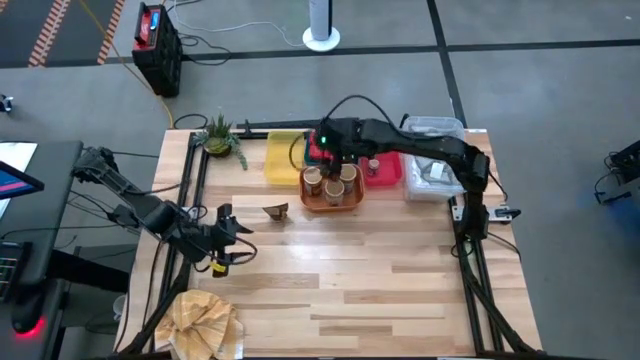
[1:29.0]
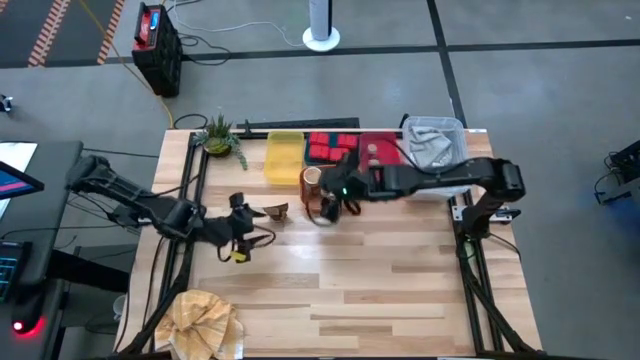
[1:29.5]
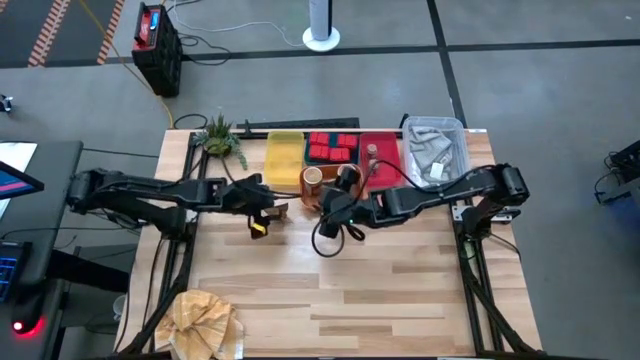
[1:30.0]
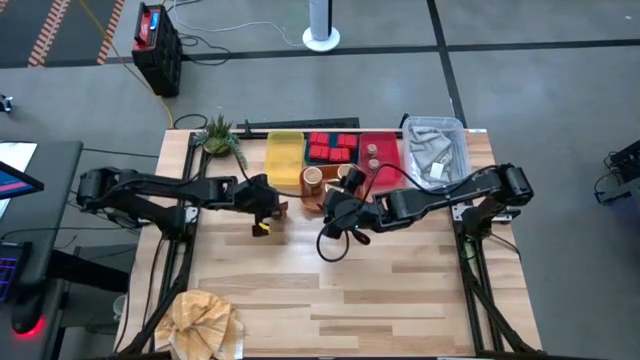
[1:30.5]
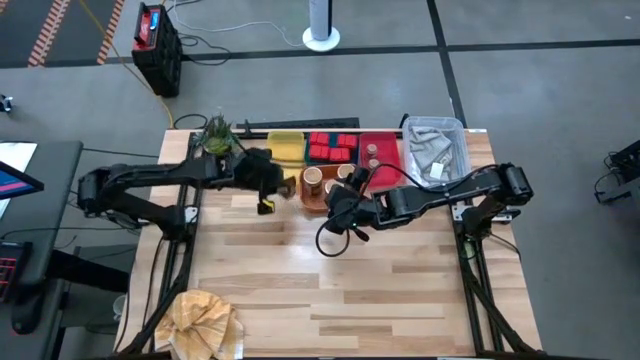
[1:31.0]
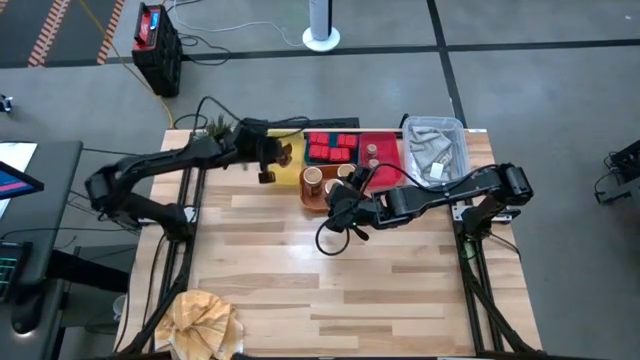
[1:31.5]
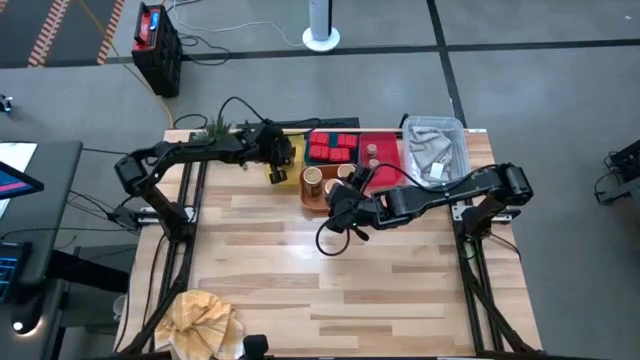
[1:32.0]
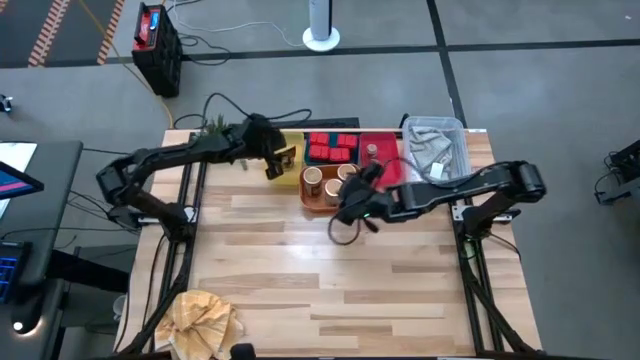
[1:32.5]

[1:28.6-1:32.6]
Task: Sort spices by type
Put the orange seasoning pack into the yellow bin

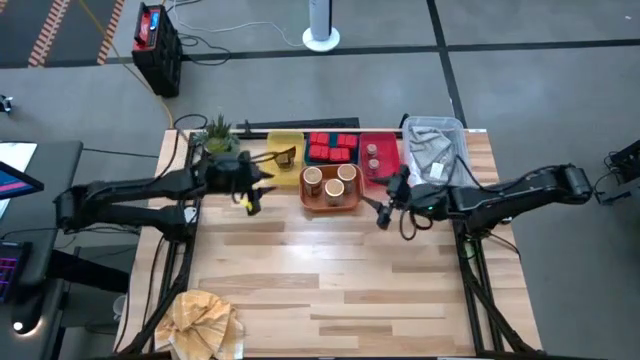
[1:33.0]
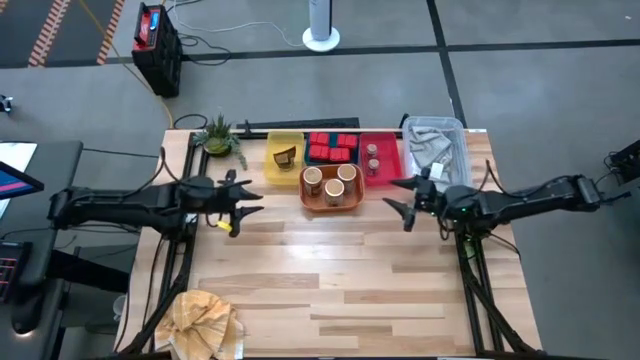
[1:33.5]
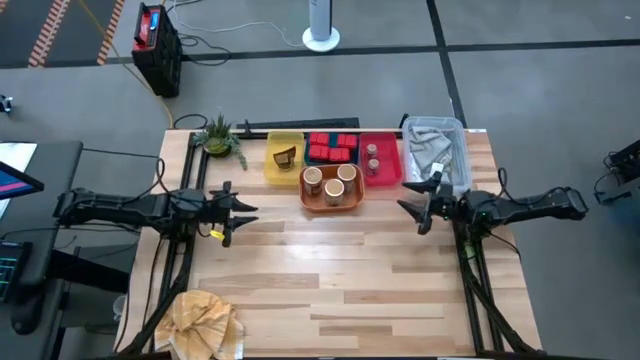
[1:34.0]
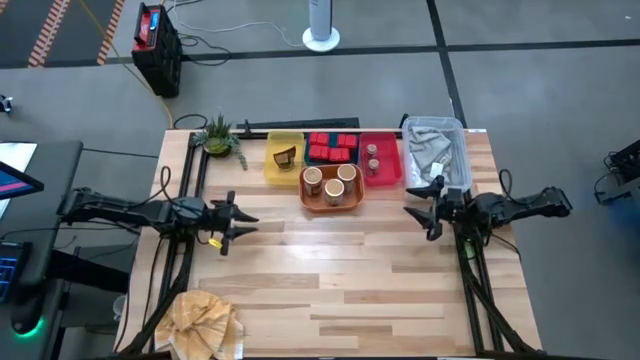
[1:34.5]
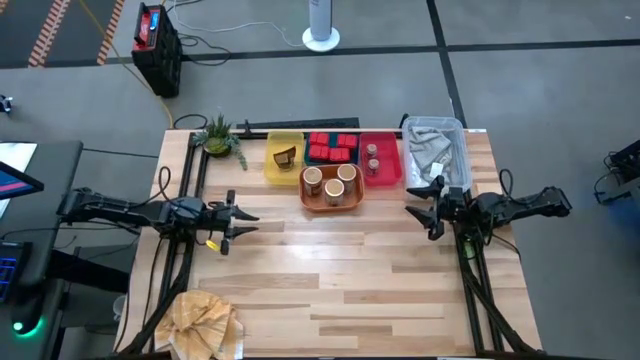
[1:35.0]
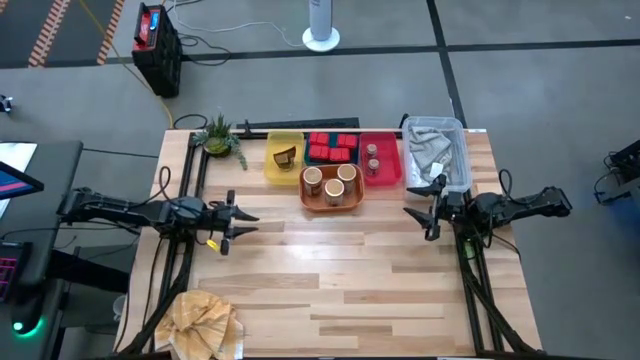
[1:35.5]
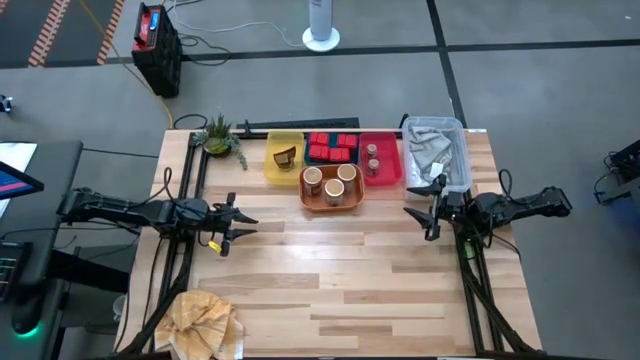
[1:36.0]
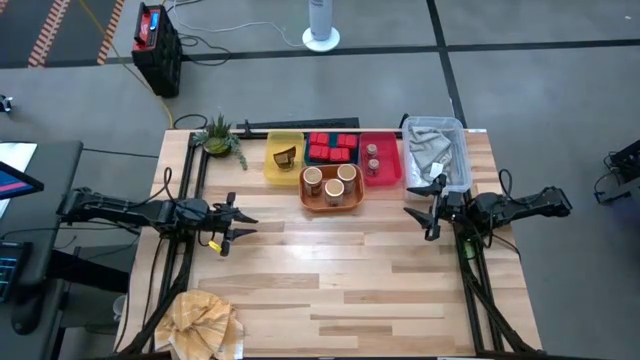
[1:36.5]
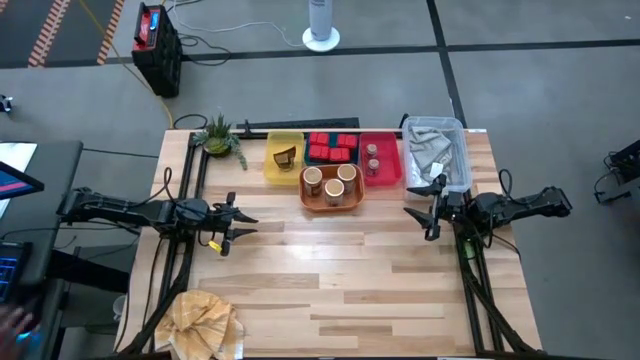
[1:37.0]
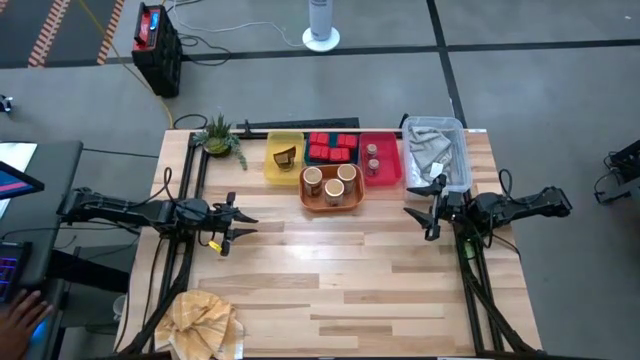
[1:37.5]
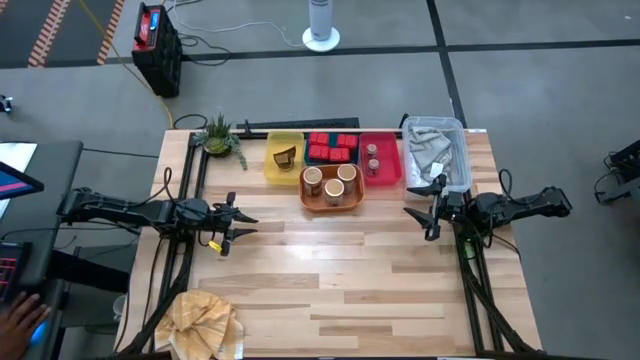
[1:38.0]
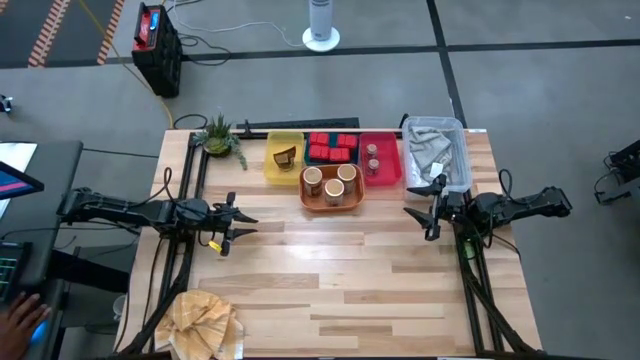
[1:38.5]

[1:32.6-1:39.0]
Return to Home Position

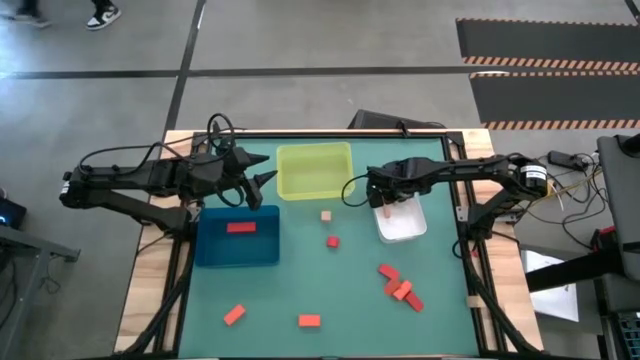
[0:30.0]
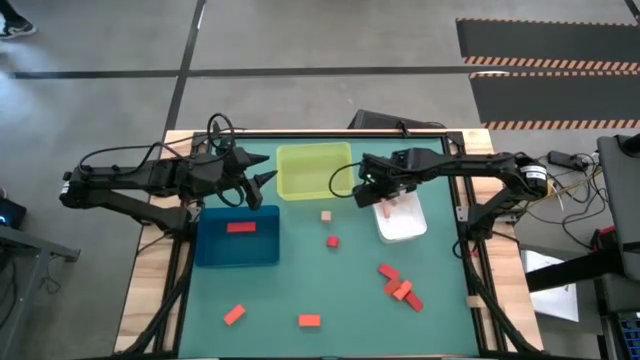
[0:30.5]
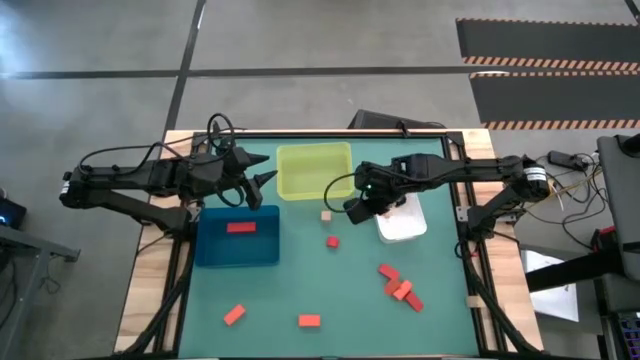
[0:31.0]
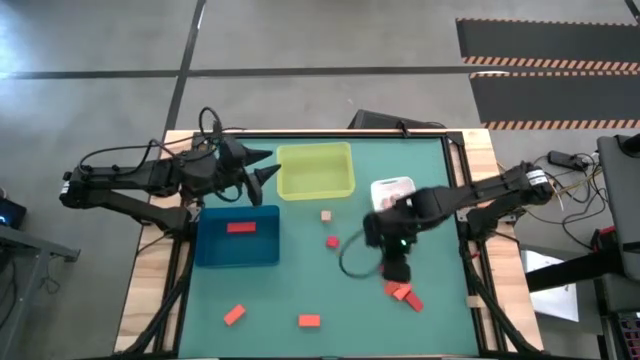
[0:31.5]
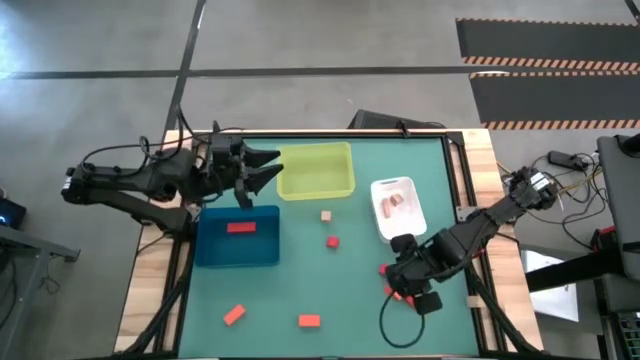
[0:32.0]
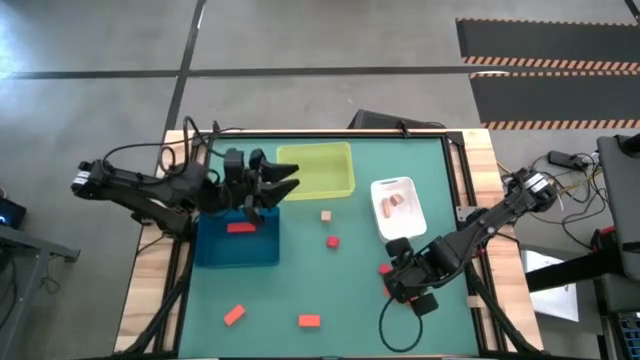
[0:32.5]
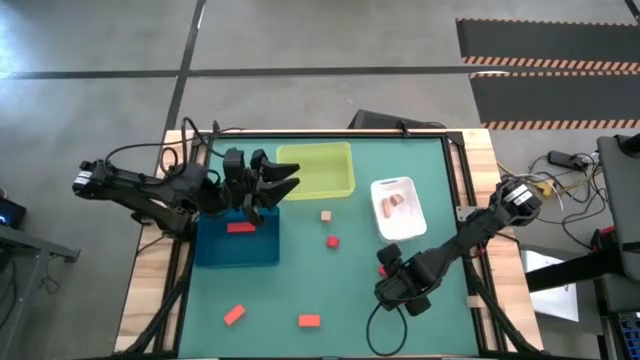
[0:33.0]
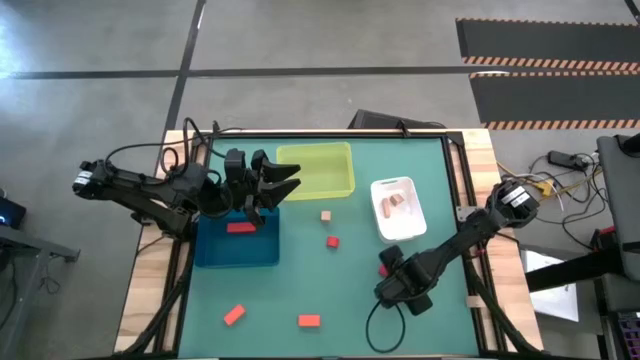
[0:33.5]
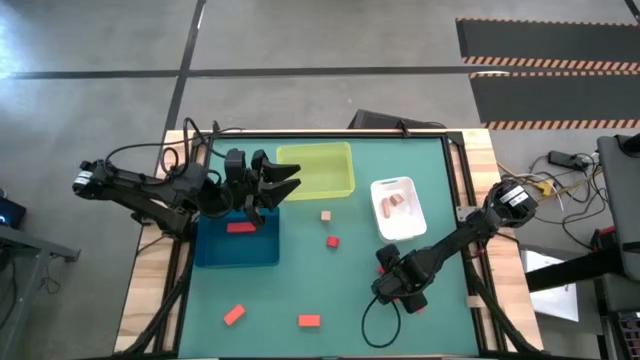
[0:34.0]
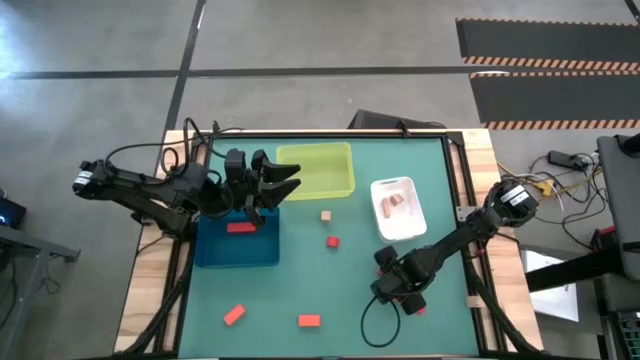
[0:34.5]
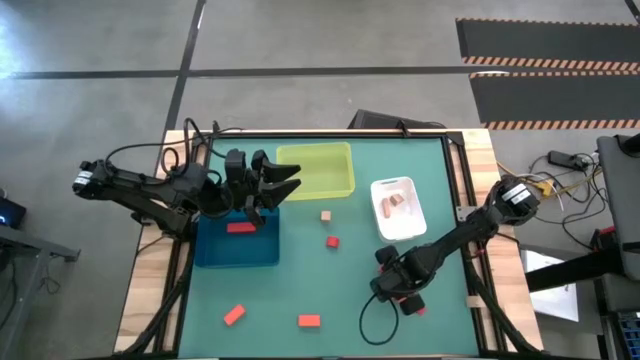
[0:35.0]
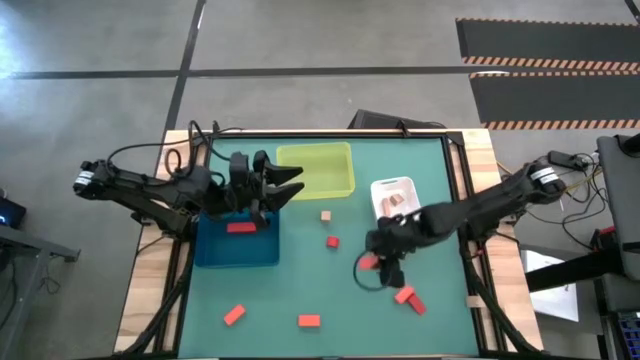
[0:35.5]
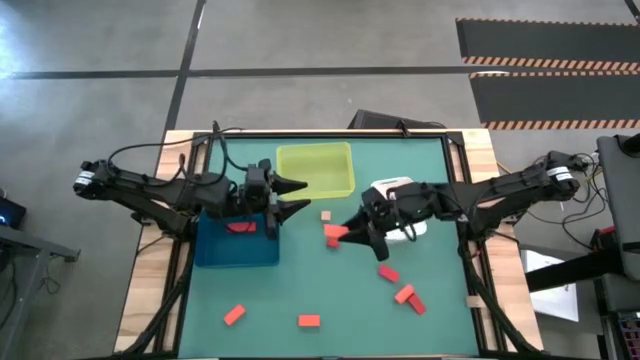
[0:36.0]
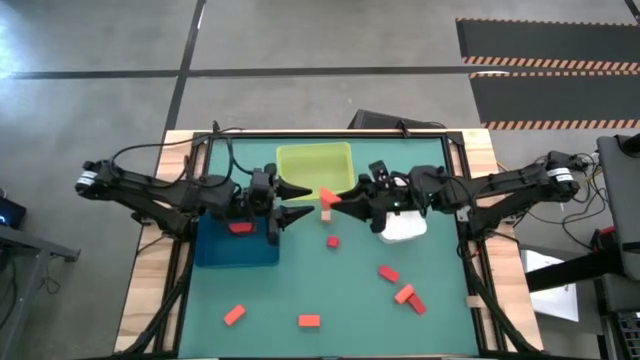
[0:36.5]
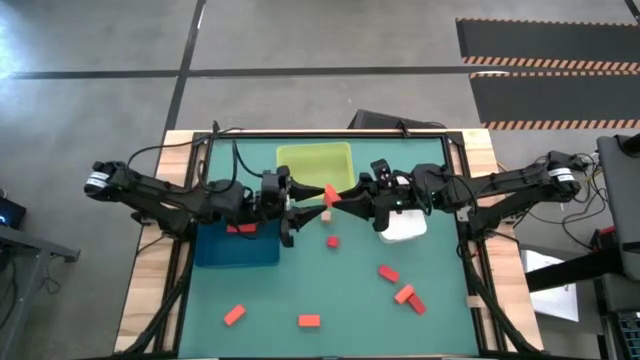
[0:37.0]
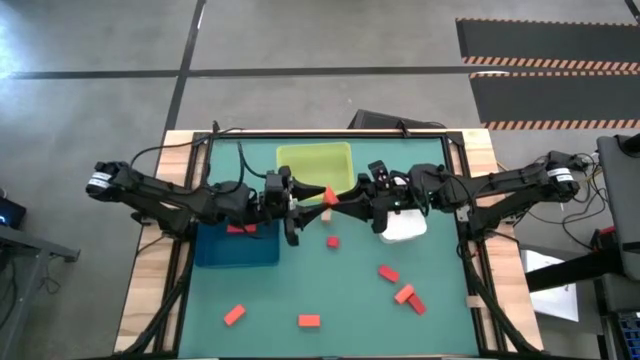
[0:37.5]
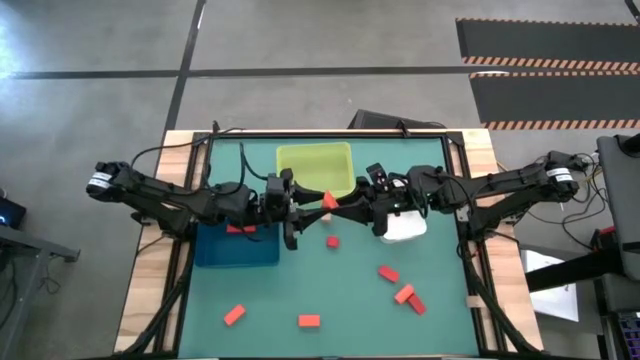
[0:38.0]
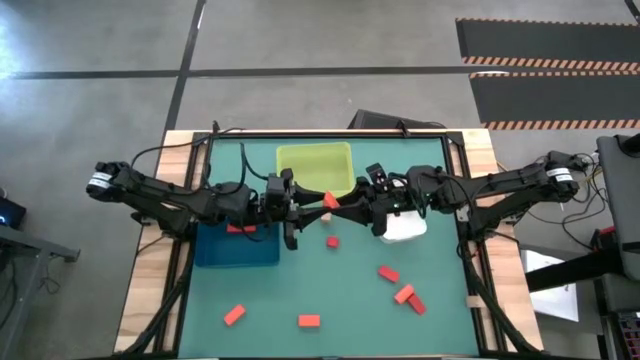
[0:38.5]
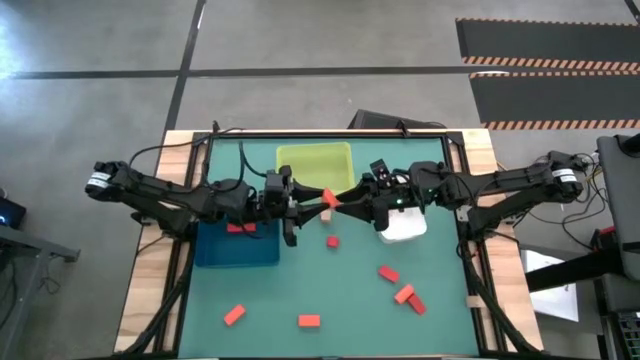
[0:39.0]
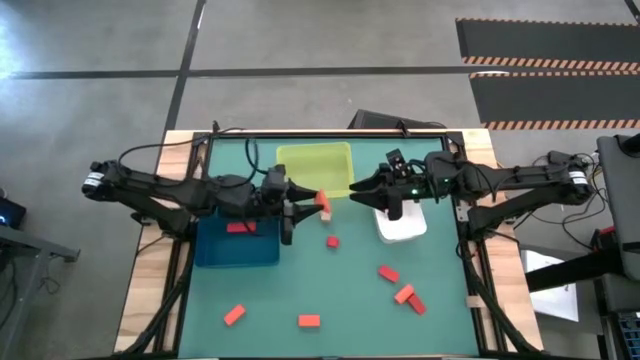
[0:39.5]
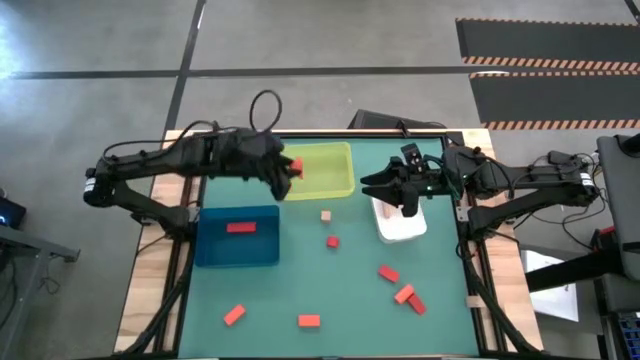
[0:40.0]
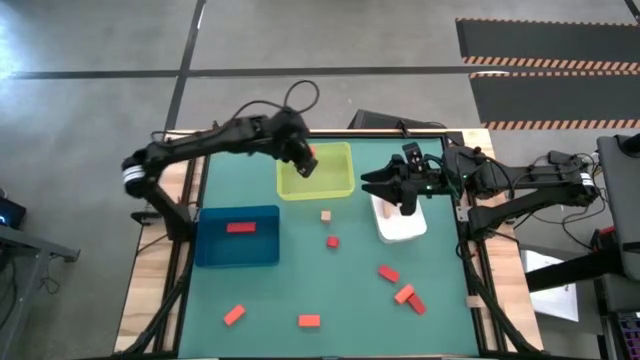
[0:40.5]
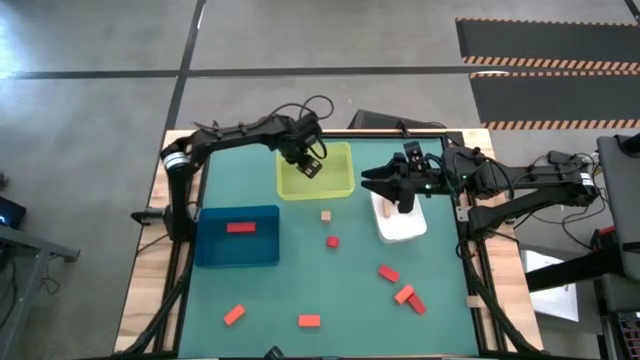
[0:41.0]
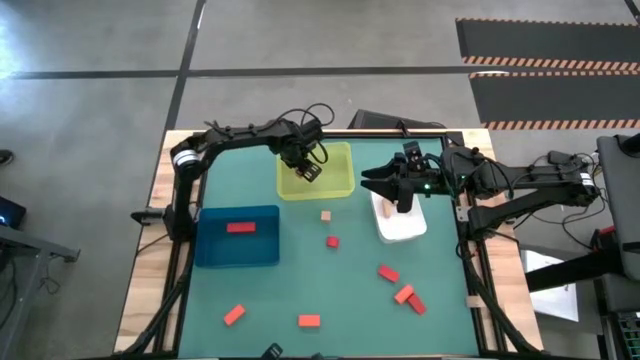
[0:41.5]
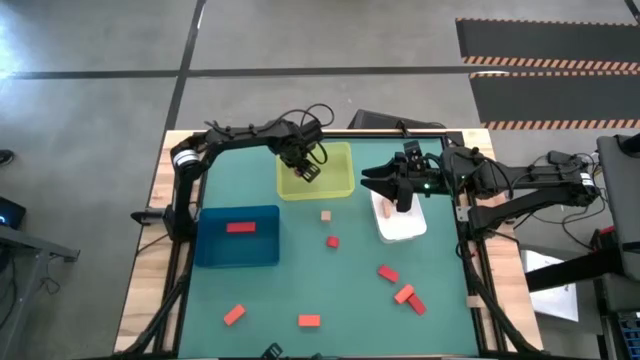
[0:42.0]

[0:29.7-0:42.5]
Task: Sort & place blocks by color
Put the orange block into the yellow bin
